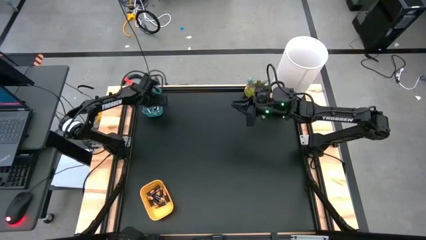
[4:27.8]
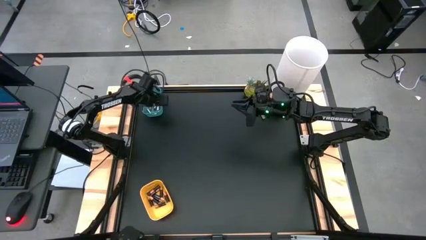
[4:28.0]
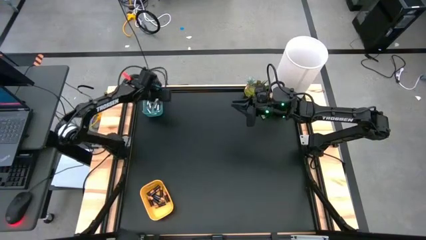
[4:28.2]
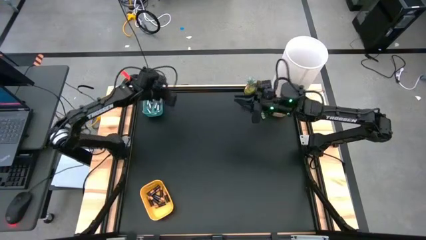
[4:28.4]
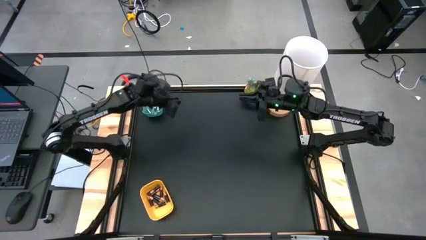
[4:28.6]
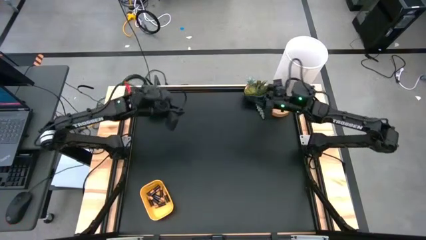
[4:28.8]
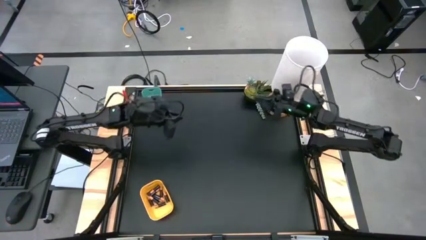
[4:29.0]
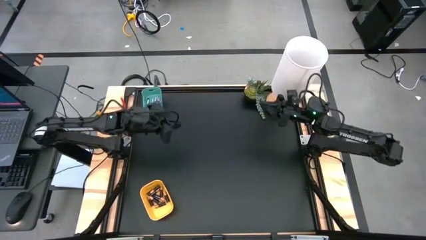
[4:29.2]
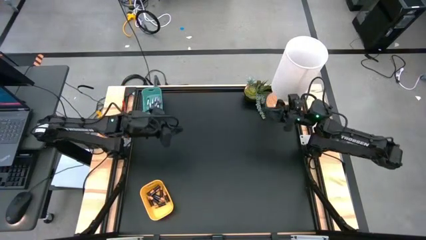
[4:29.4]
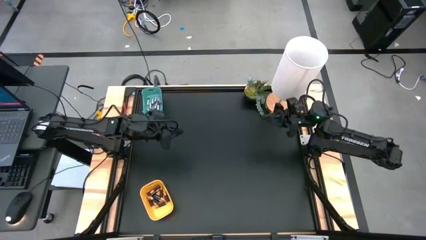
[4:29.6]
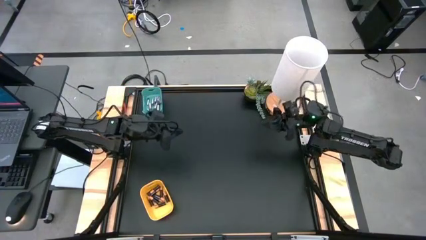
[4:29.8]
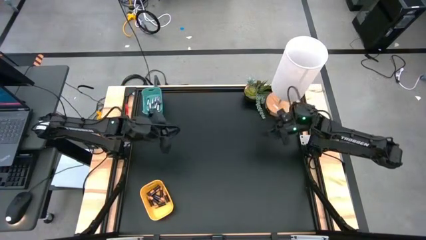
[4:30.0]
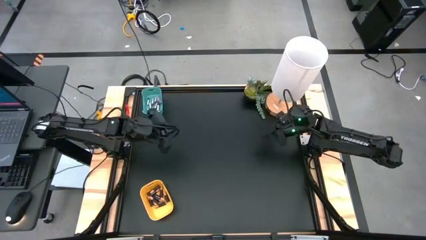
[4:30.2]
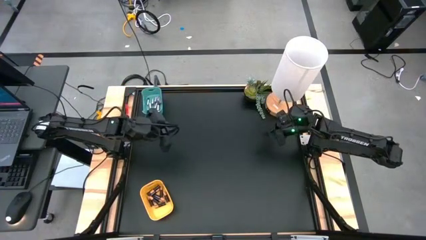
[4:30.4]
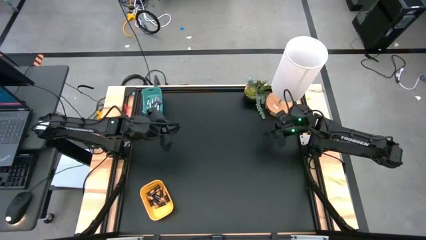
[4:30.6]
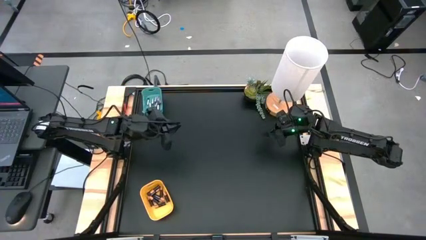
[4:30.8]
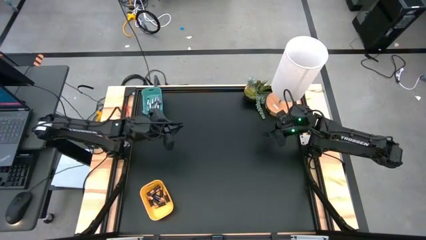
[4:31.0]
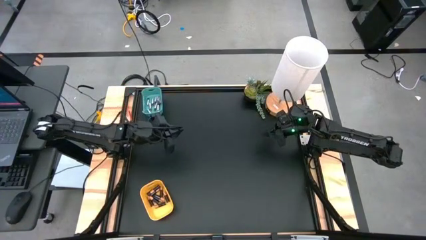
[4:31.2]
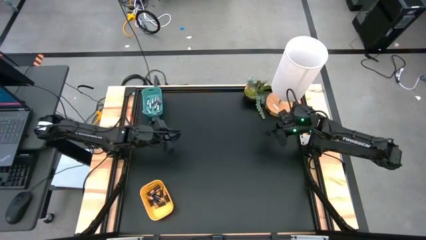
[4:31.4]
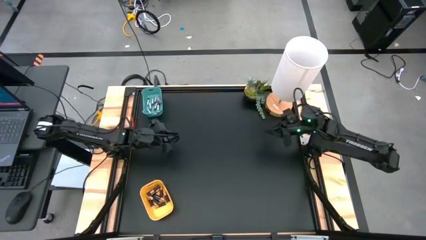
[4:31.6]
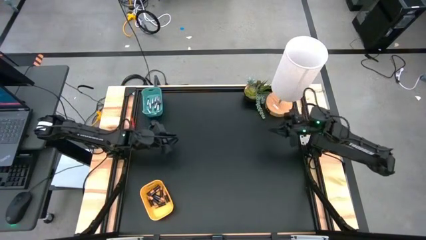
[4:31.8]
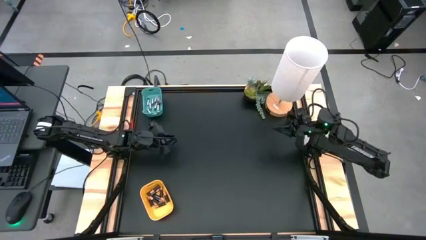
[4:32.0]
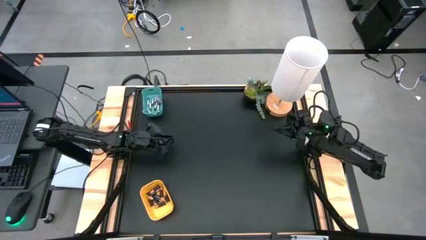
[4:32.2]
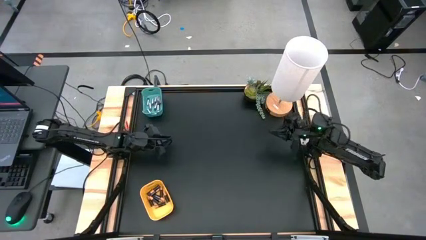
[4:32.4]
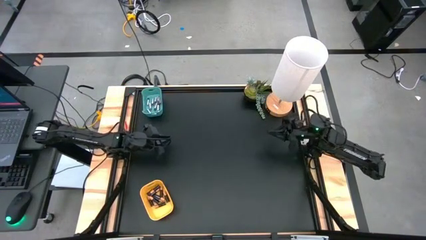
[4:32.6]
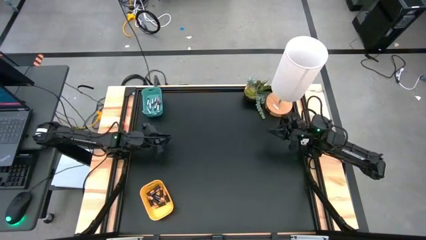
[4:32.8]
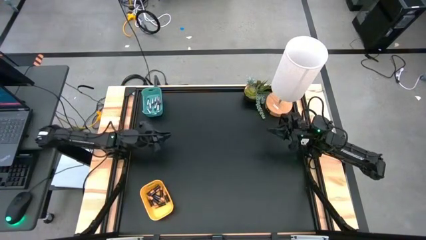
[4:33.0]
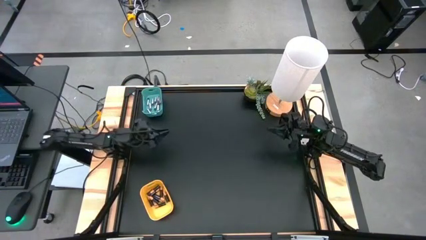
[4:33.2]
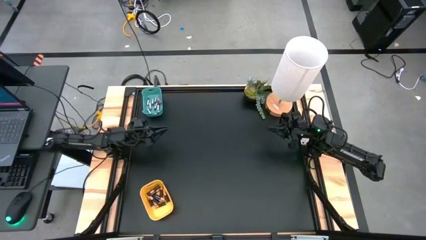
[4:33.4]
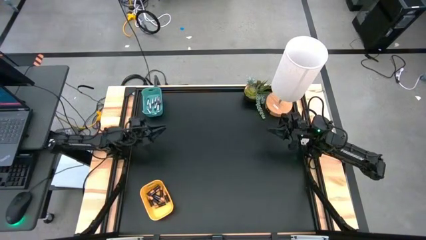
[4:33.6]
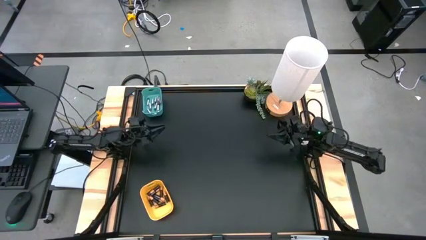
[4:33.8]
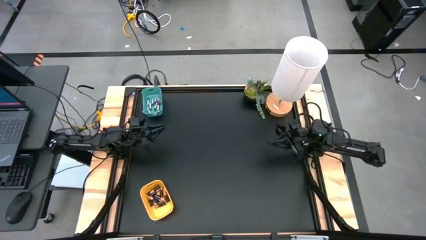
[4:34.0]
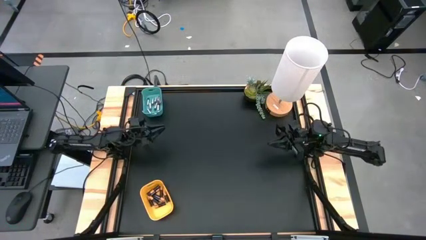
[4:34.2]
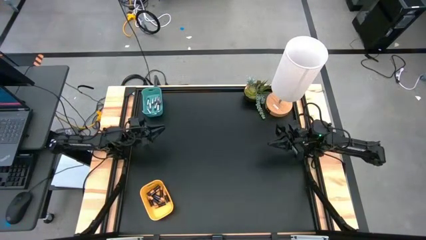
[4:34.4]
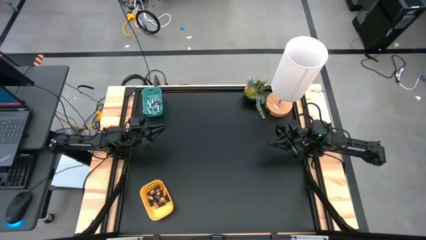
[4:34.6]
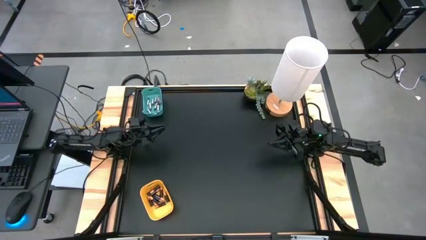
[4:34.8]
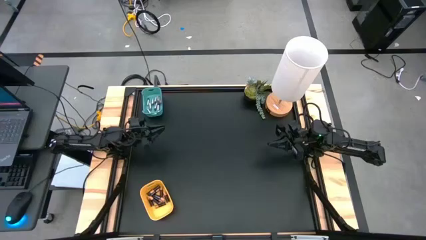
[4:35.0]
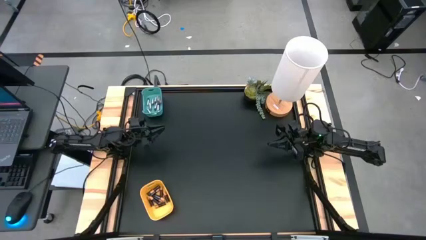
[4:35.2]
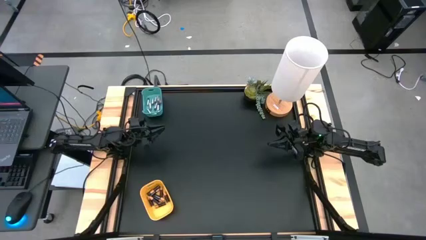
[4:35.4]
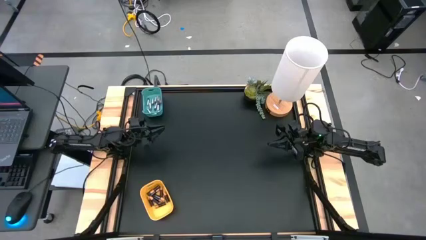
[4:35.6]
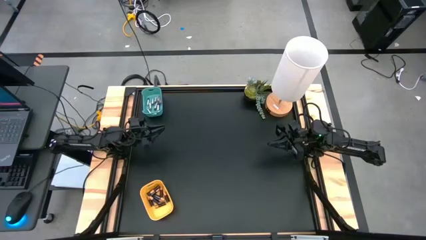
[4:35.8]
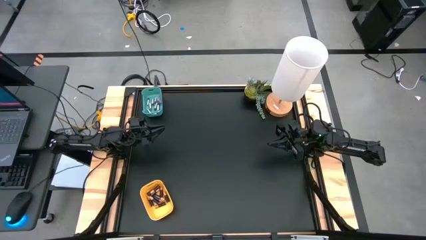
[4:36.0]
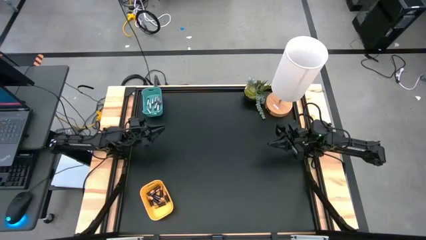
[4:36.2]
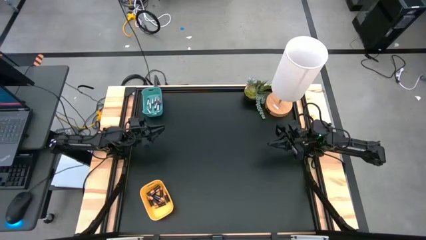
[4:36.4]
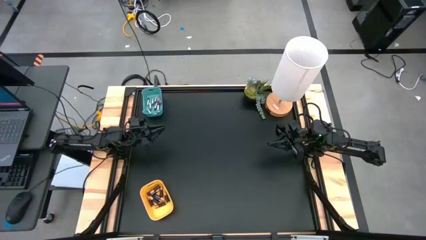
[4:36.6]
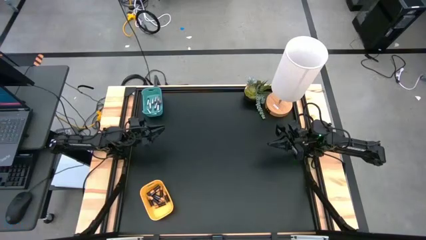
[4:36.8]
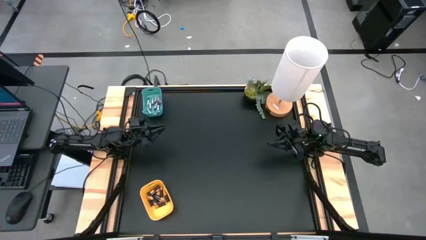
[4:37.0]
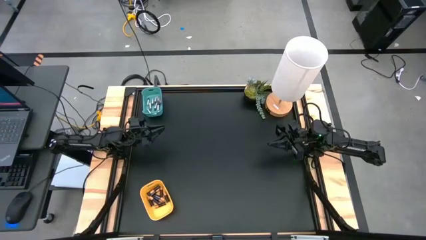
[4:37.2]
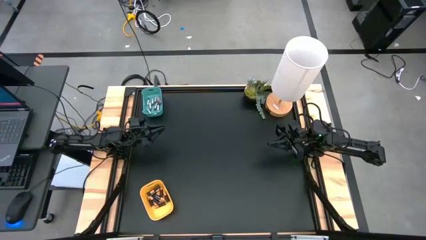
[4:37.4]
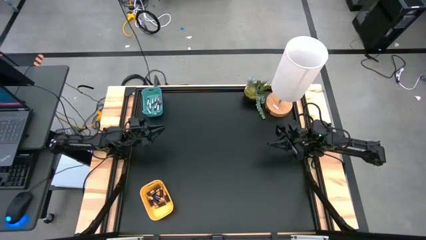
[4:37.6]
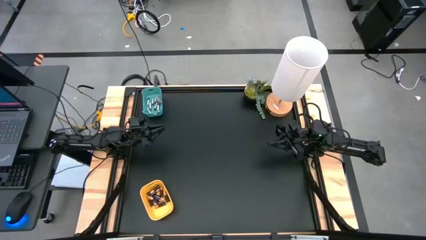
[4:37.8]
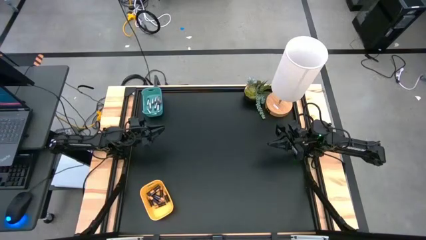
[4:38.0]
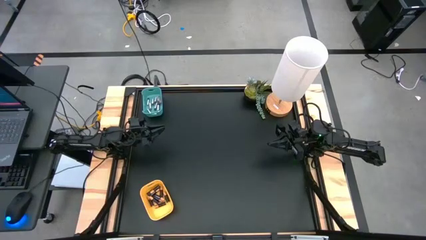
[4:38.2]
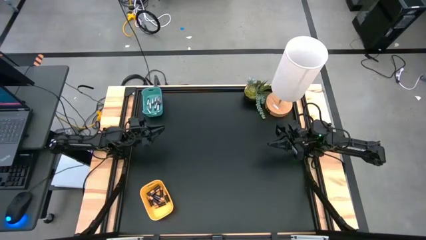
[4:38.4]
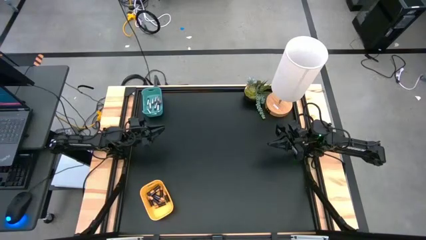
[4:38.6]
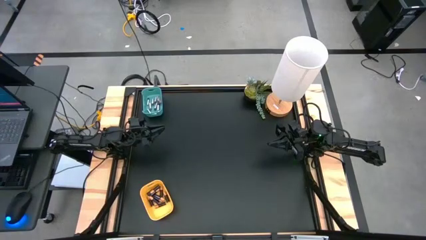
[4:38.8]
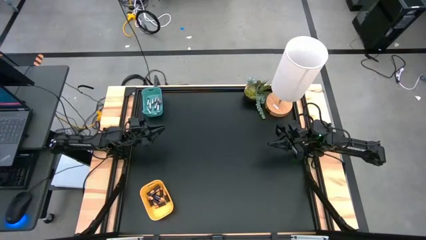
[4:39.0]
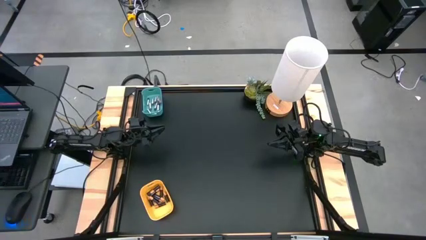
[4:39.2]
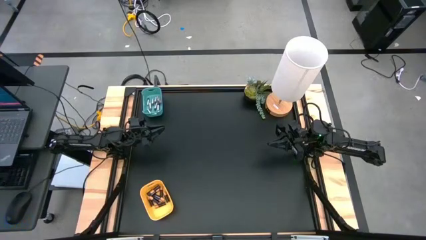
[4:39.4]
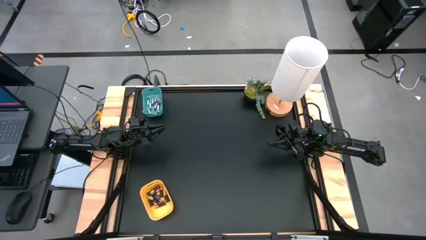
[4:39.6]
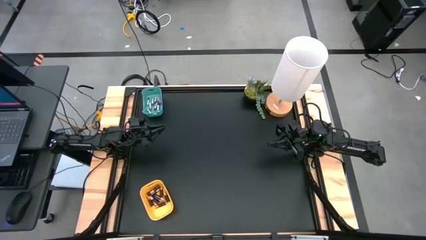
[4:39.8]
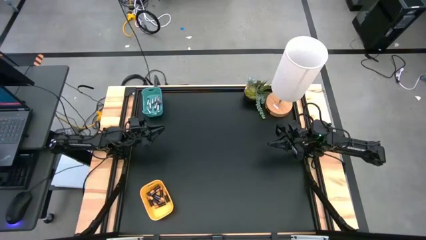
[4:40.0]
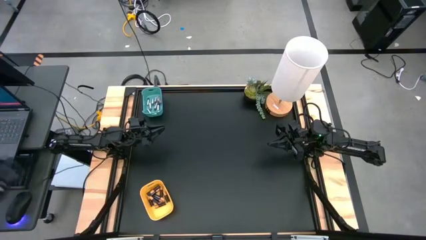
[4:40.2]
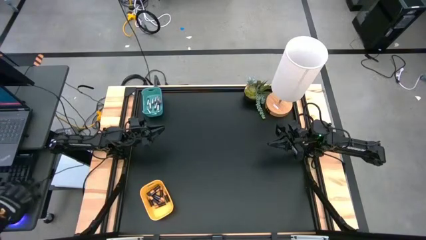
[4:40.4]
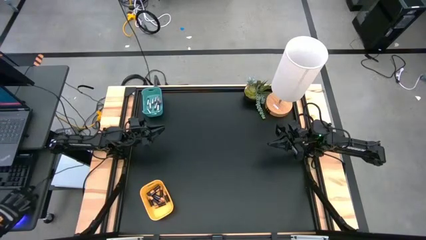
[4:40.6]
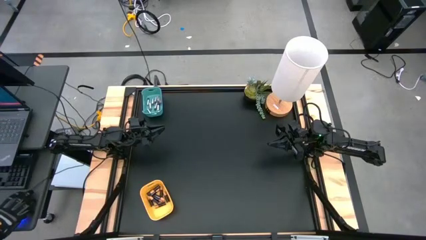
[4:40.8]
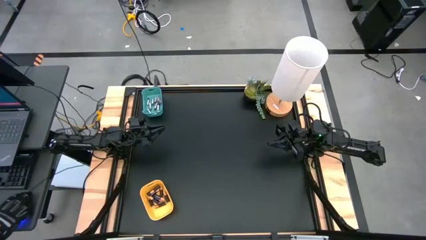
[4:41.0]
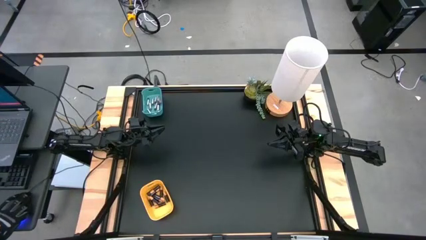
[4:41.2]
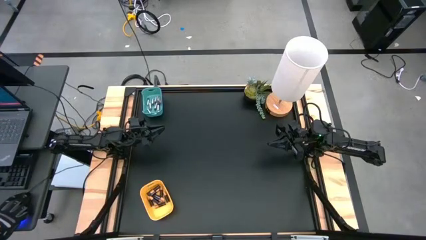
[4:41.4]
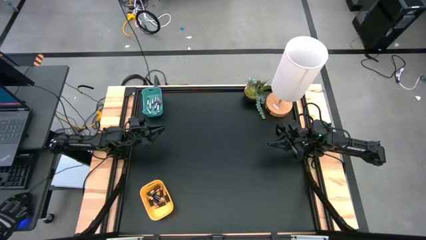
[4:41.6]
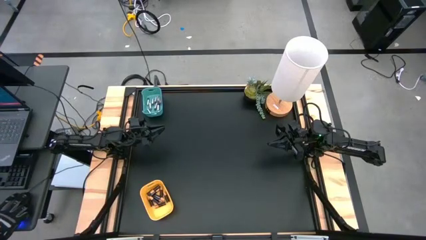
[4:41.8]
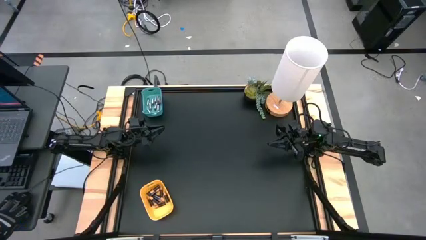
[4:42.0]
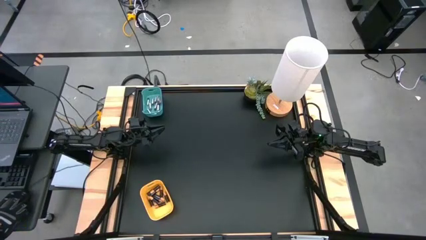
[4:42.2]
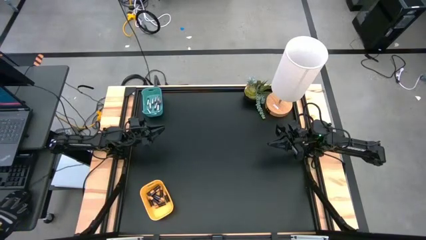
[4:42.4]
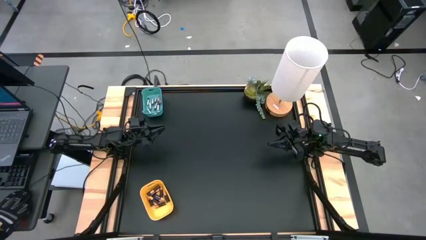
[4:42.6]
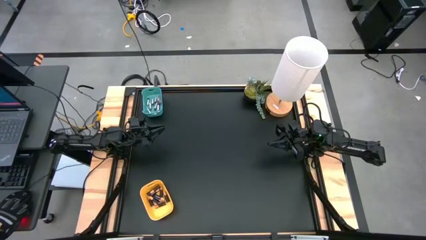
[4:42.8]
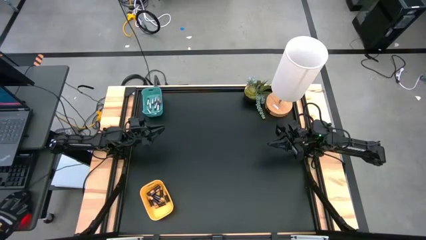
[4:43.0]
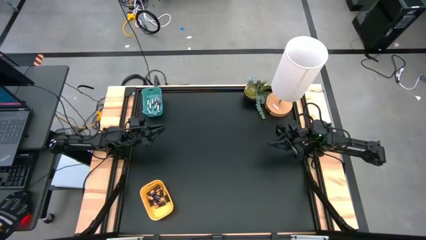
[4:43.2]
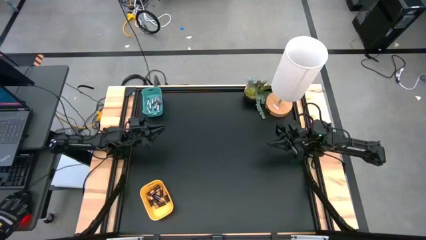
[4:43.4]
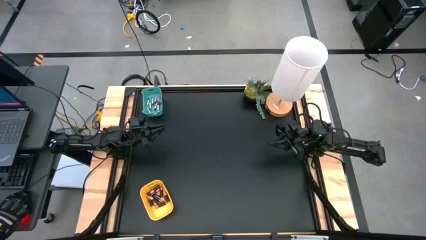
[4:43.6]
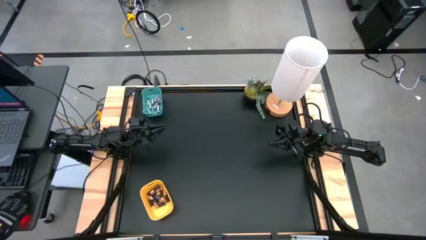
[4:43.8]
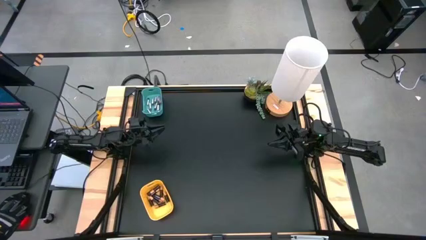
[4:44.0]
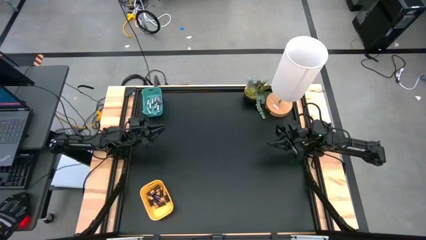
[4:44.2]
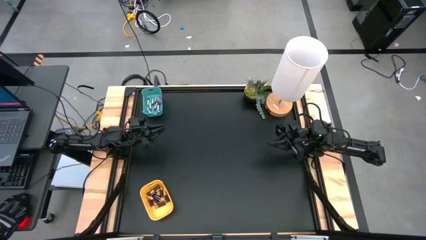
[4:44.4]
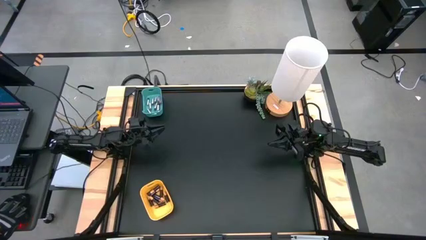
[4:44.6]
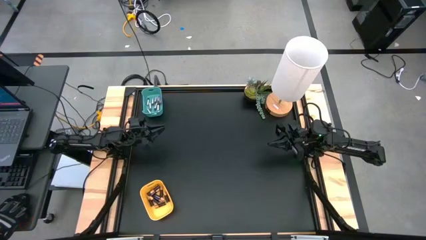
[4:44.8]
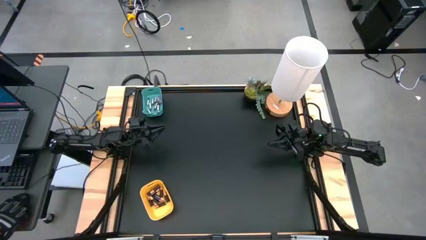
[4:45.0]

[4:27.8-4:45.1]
Task: Sort batteries
Return to Home Position
